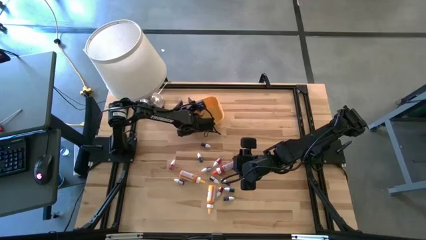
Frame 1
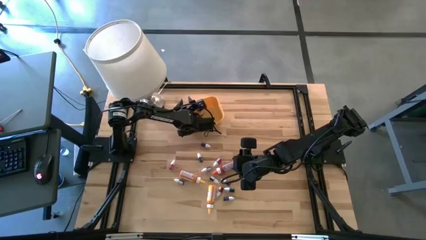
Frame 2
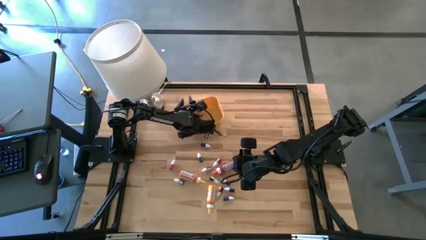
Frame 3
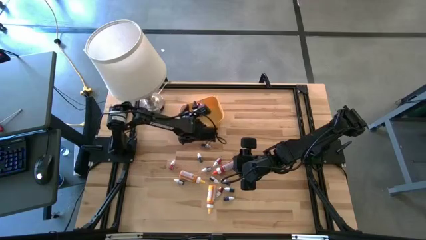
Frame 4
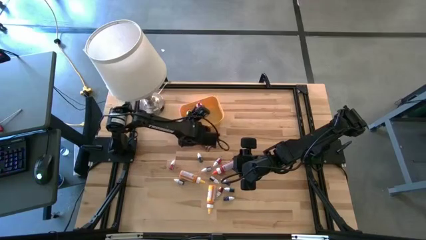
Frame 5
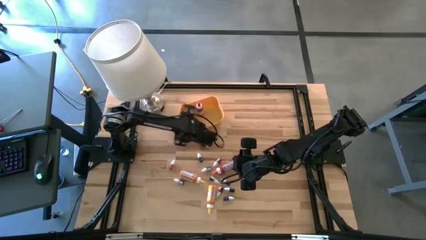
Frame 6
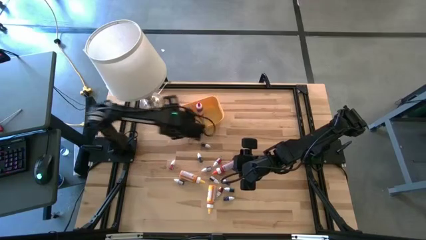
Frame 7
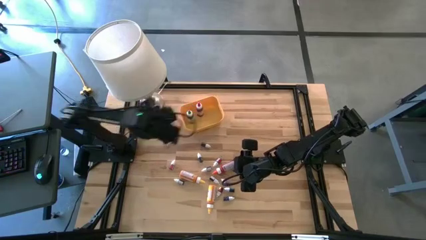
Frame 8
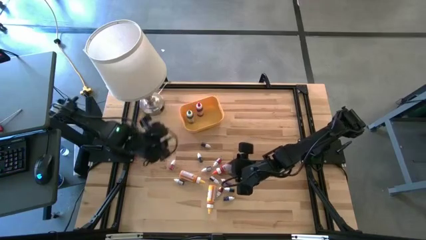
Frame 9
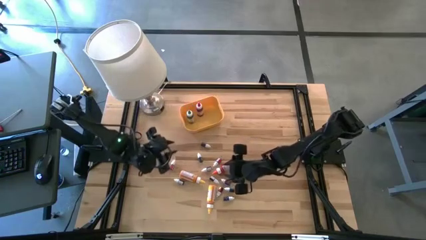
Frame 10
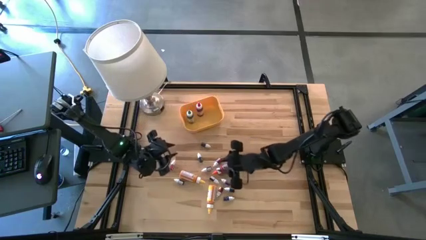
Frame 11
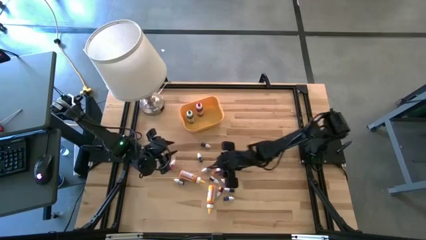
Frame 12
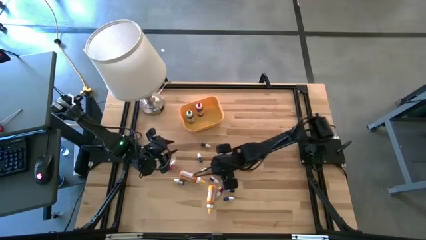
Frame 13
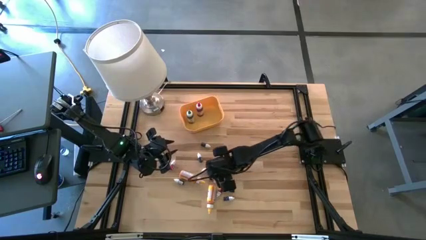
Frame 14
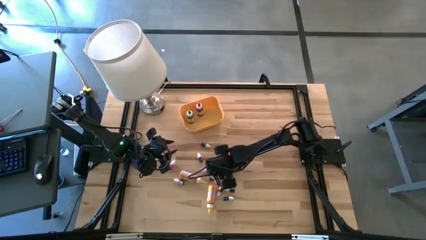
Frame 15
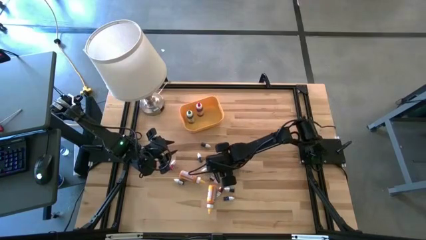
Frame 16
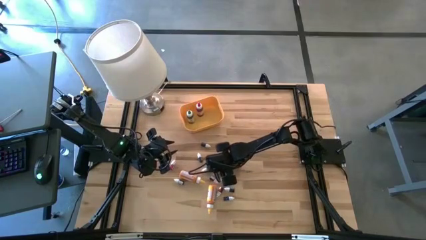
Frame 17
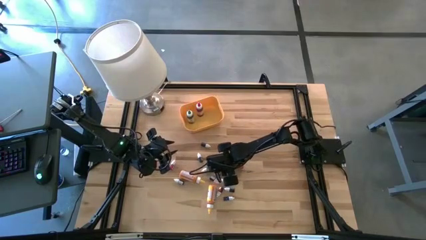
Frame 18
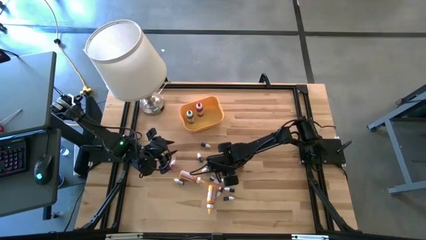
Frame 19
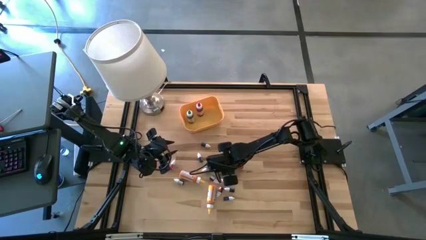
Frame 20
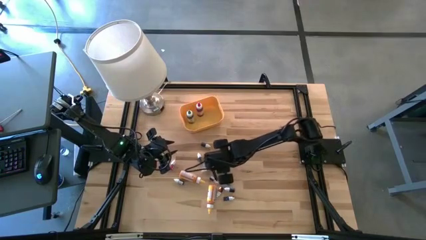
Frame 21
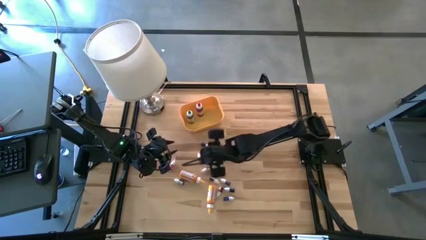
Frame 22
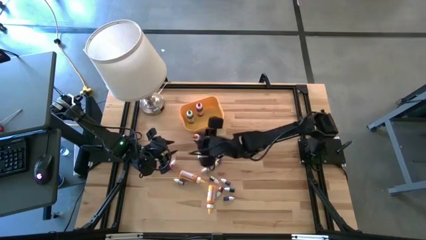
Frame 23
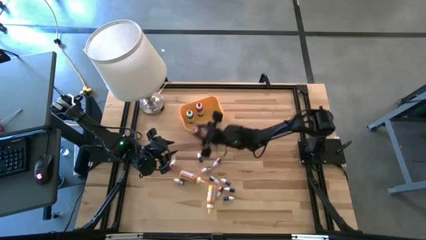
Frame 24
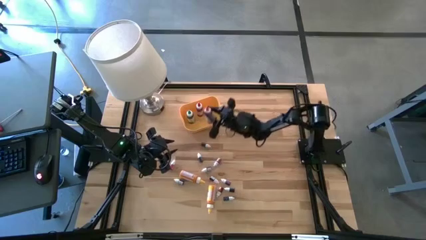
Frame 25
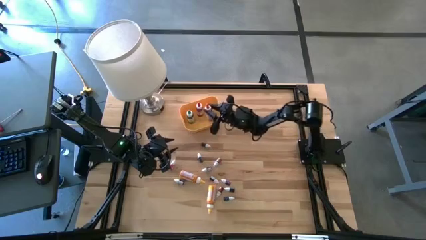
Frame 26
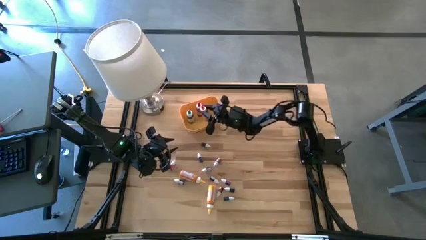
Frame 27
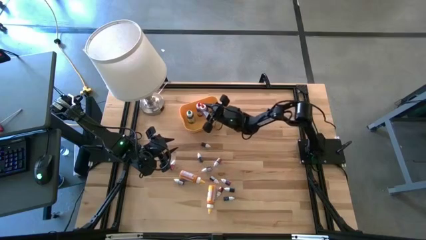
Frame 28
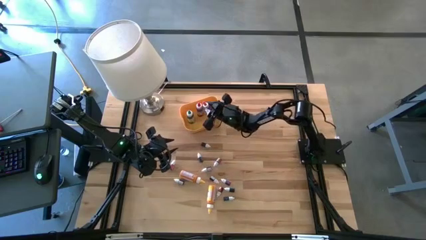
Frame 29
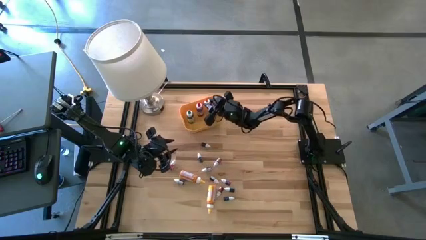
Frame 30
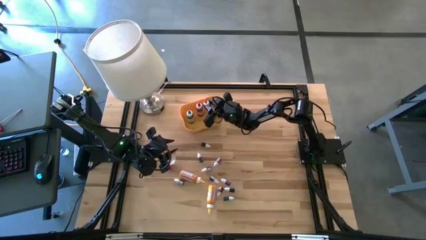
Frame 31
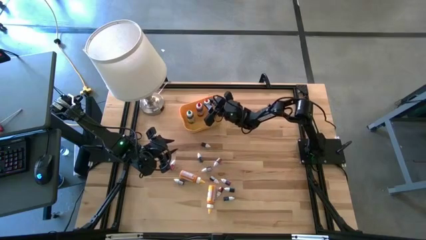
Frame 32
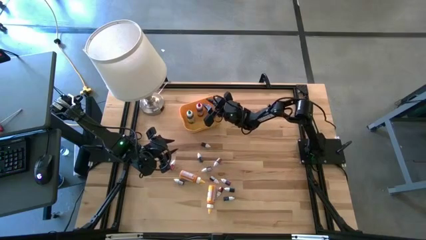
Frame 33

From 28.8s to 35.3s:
Task: Pick & Place food coloring
Put the large orange food coloring bottle into the bin

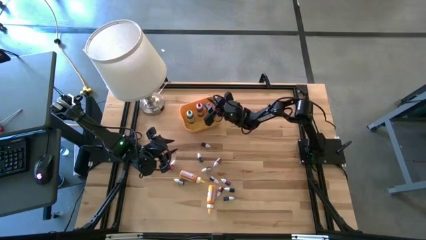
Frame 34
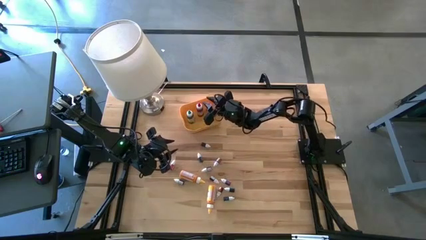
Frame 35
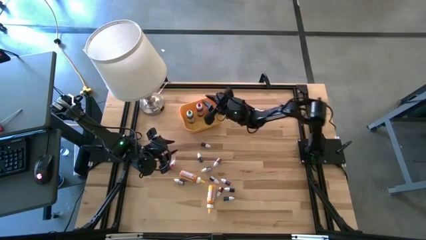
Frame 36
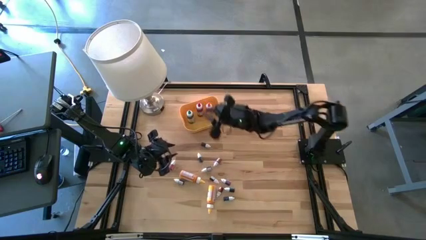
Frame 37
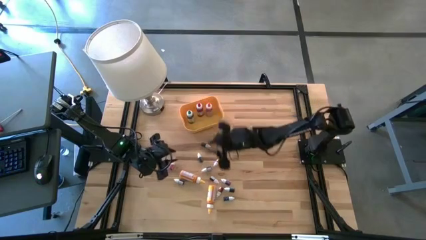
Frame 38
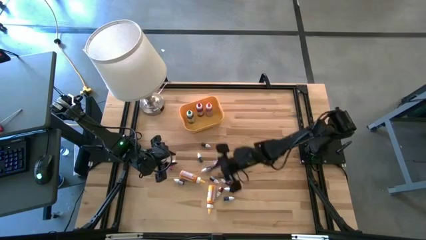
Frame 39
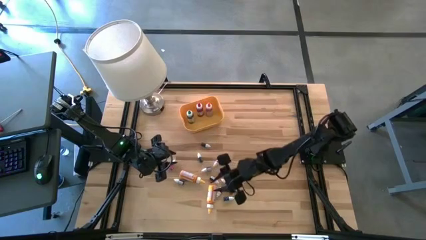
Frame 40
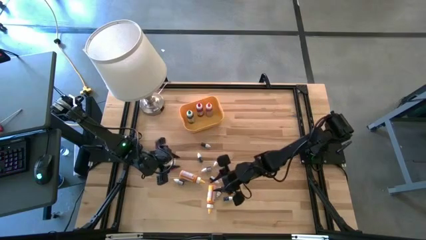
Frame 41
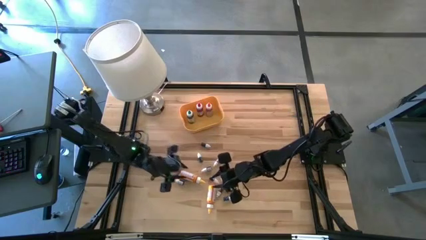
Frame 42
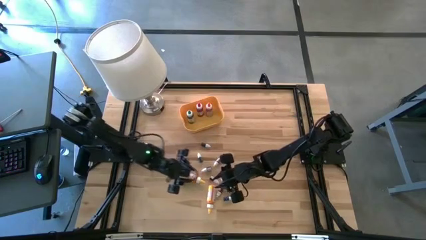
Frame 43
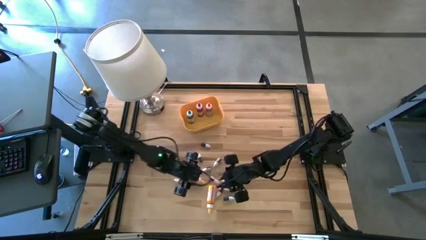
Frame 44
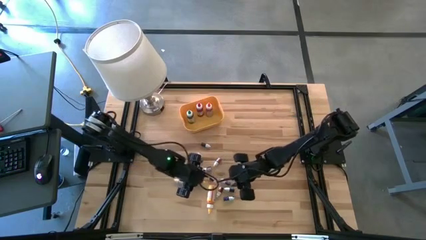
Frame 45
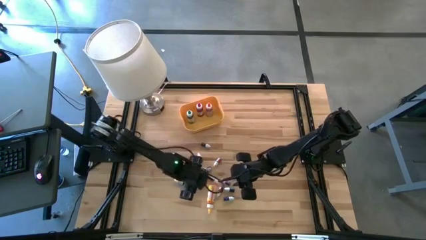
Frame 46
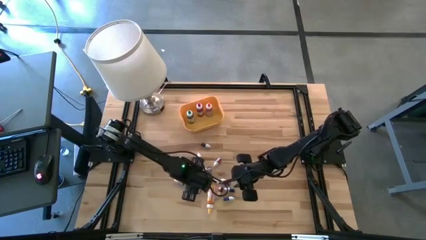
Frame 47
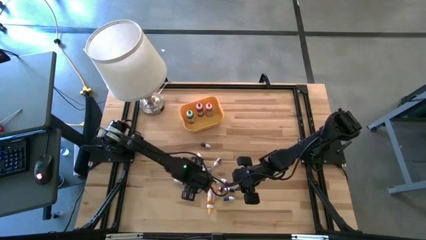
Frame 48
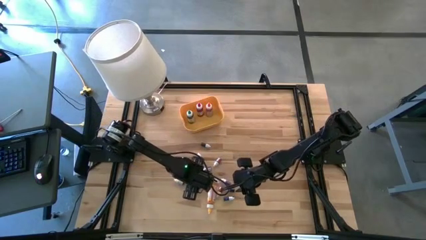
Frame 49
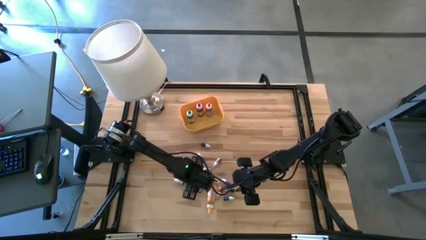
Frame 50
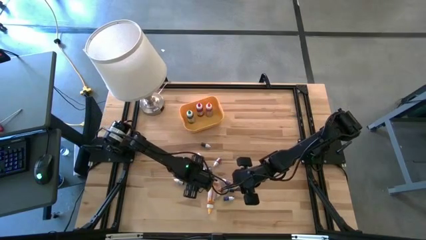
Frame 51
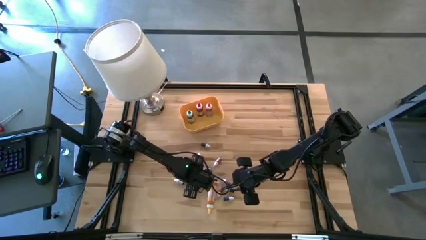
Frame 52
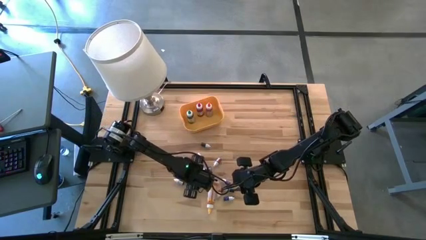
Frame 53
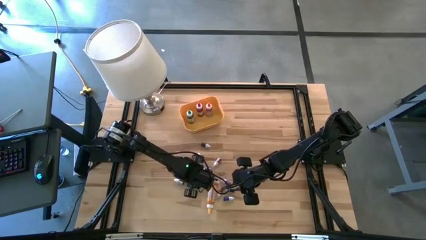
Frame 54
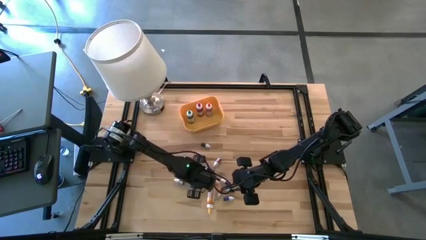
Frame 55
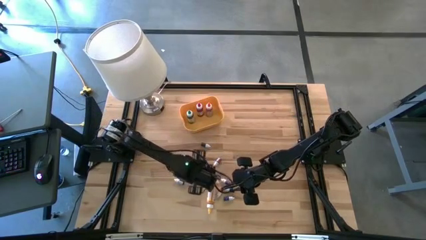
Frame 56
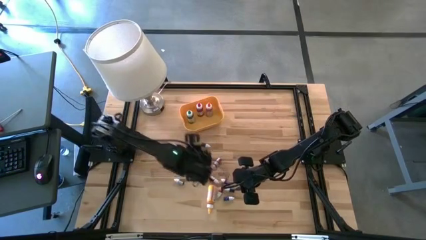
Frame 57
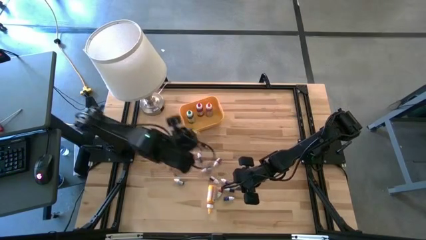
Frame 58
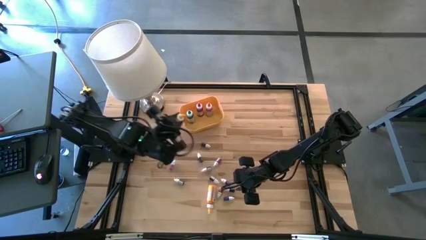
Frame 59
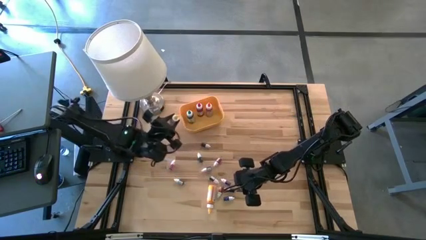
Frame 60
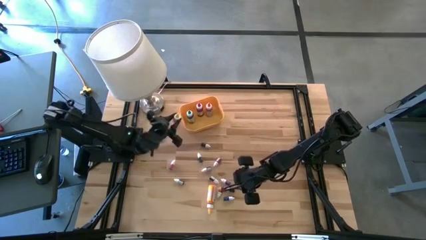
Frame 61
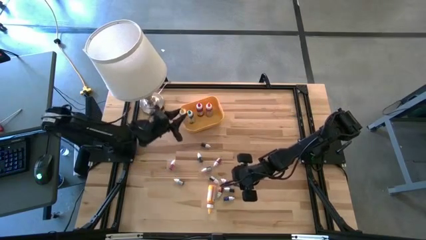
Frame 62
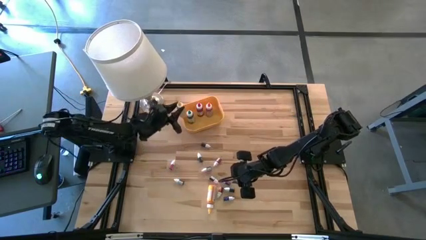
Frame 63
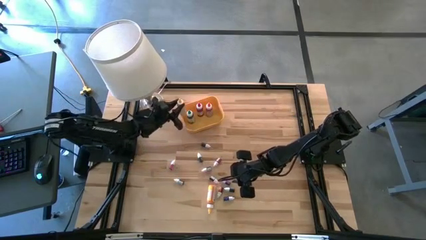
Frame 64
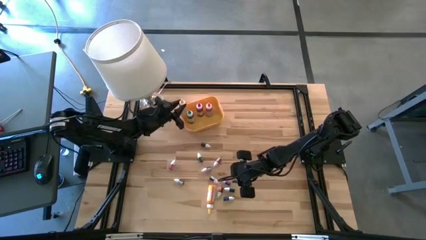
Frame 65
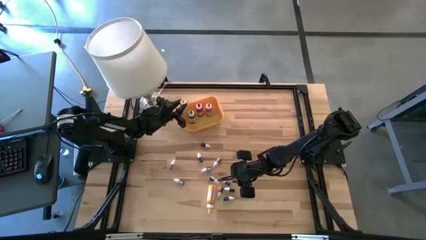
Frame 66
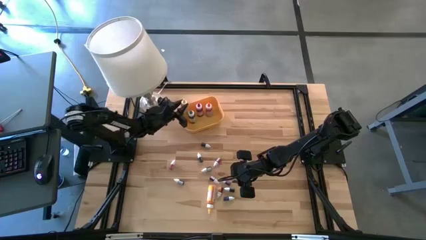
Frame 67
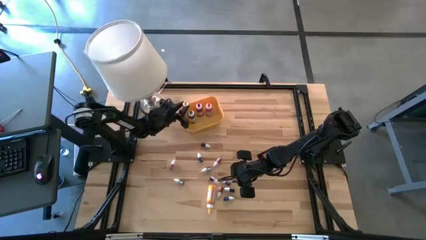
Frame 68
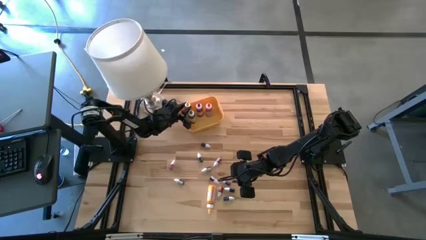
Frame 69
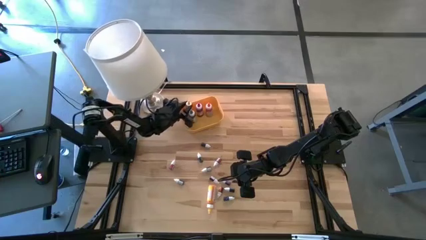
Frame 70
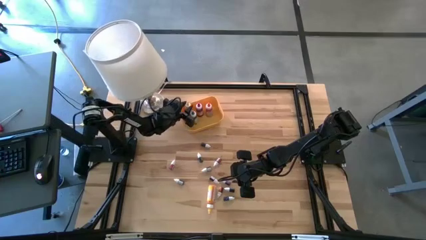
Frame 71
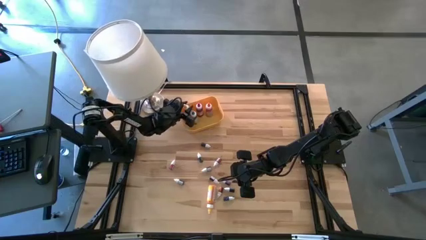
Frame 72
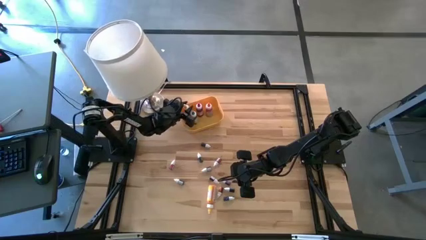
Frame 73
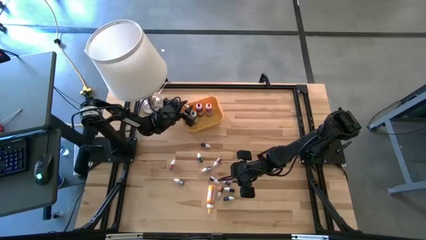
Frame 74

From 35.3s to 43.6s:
Put the left large yellow food coloring bottle into the bin
